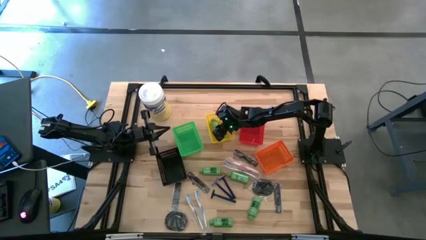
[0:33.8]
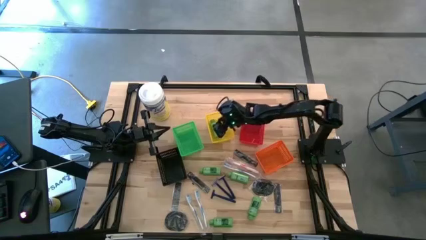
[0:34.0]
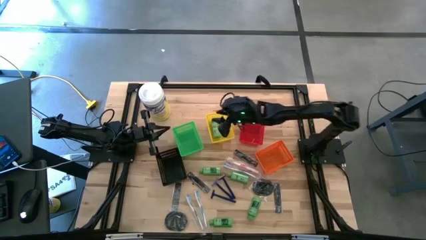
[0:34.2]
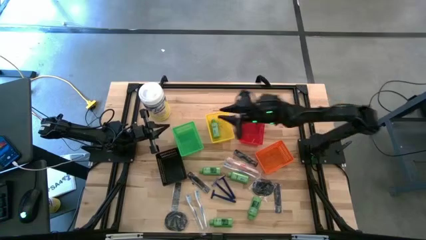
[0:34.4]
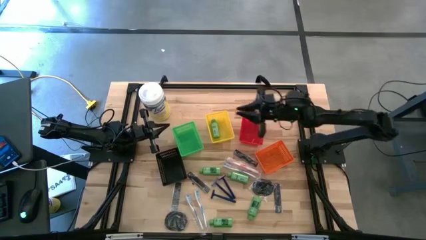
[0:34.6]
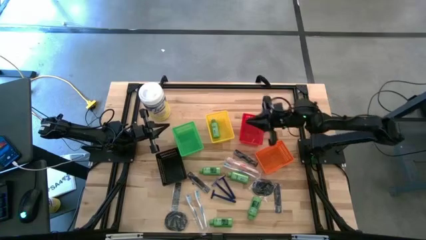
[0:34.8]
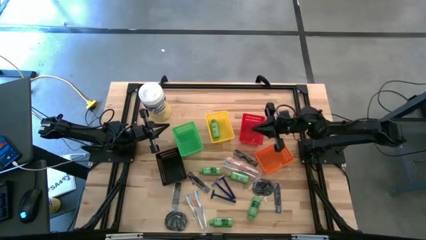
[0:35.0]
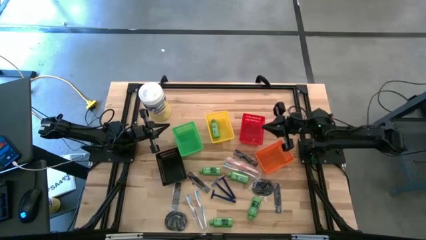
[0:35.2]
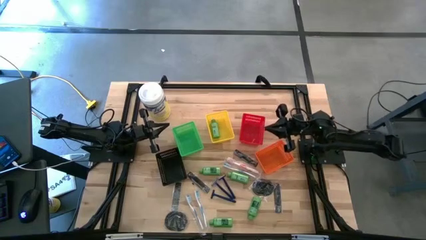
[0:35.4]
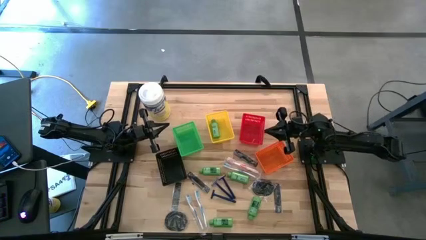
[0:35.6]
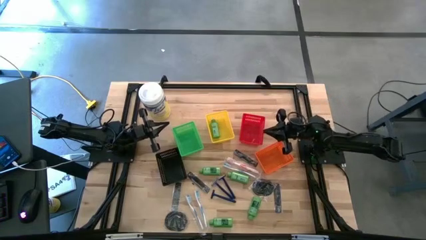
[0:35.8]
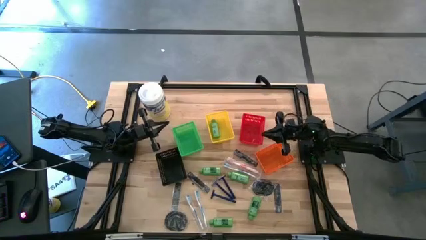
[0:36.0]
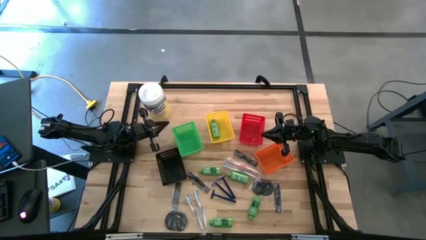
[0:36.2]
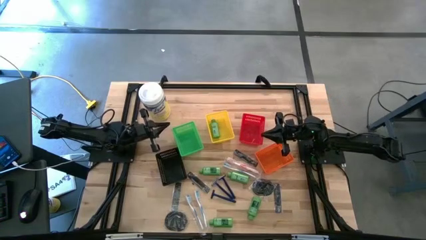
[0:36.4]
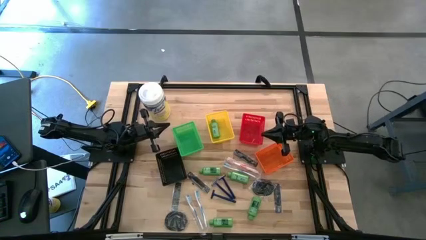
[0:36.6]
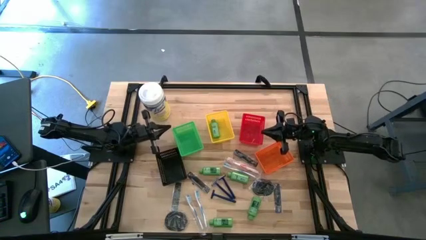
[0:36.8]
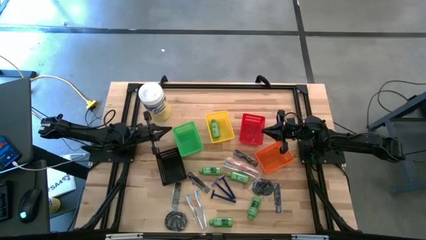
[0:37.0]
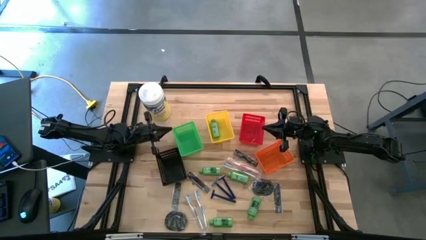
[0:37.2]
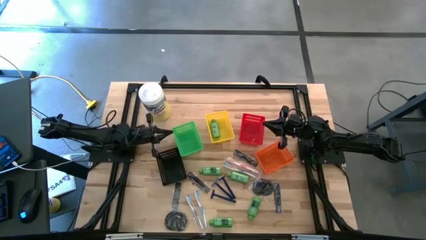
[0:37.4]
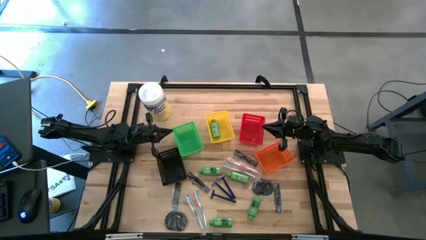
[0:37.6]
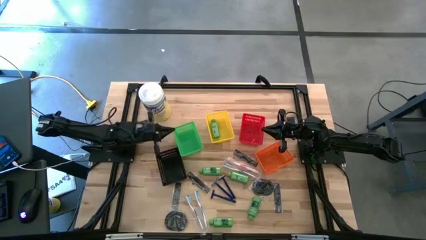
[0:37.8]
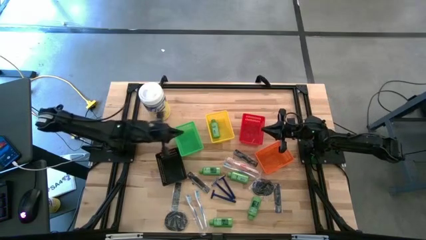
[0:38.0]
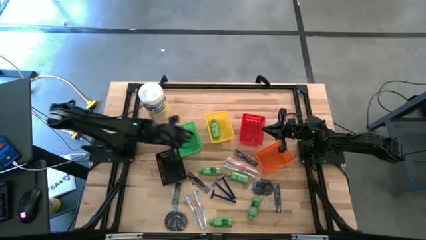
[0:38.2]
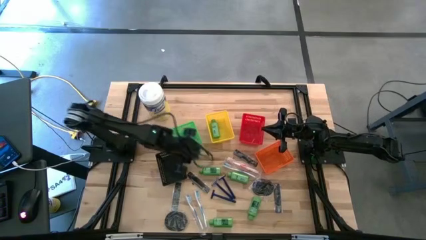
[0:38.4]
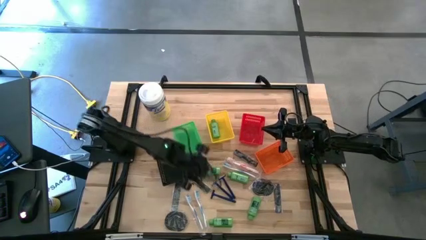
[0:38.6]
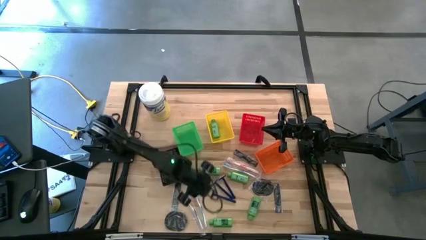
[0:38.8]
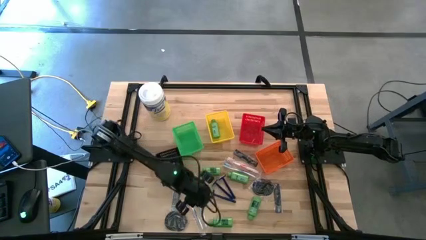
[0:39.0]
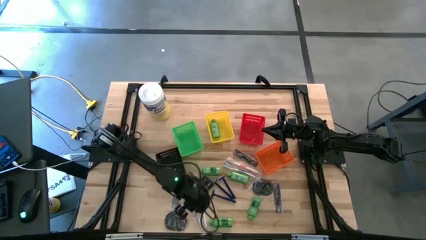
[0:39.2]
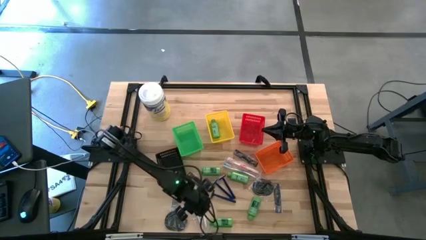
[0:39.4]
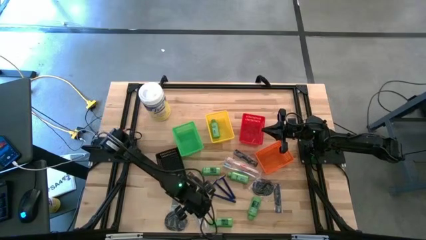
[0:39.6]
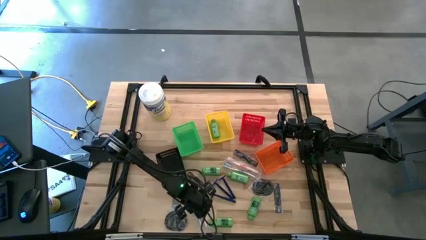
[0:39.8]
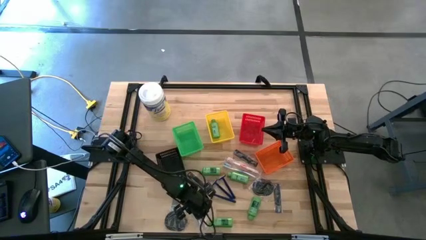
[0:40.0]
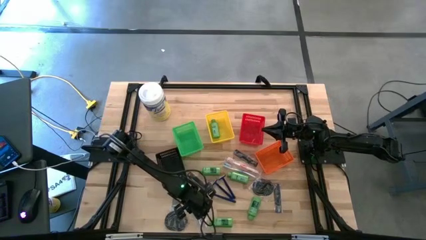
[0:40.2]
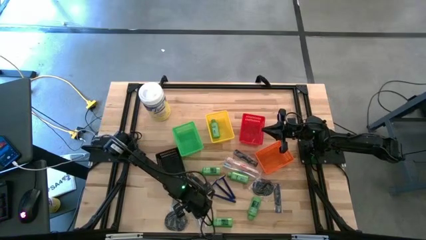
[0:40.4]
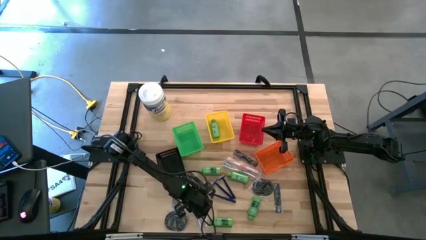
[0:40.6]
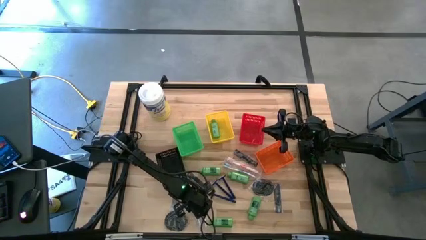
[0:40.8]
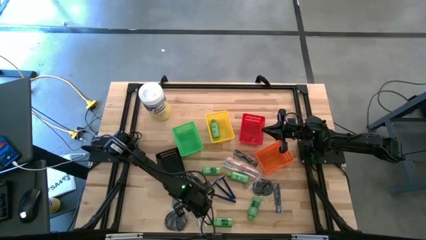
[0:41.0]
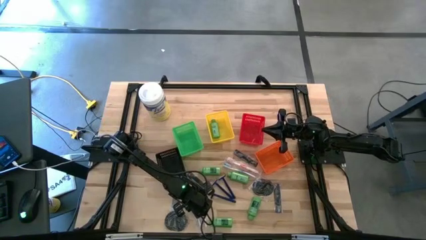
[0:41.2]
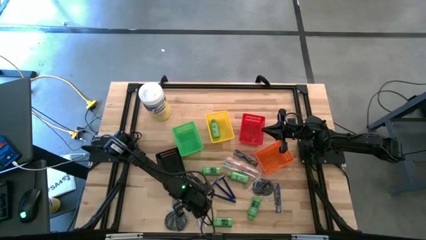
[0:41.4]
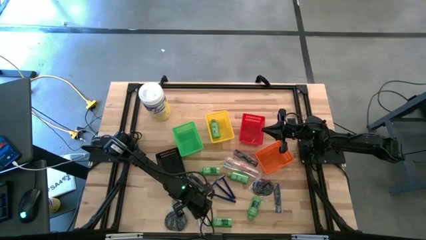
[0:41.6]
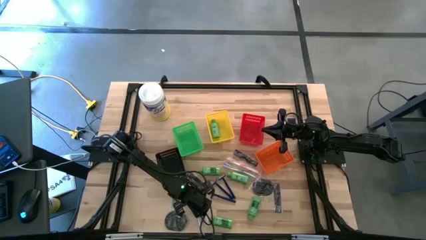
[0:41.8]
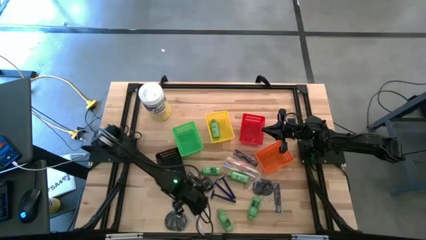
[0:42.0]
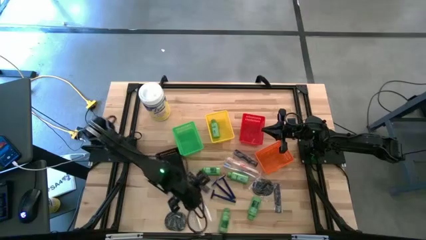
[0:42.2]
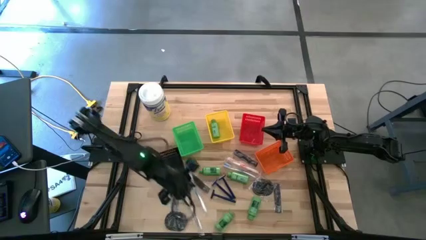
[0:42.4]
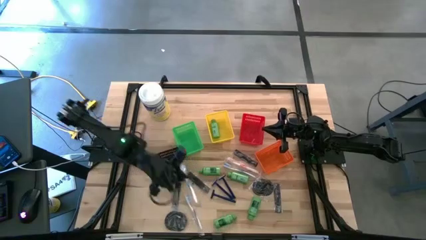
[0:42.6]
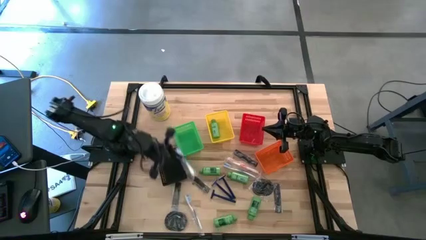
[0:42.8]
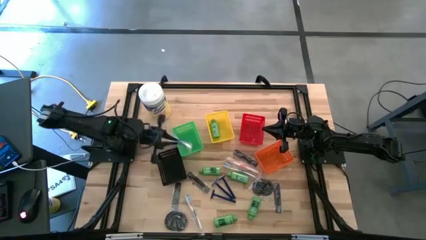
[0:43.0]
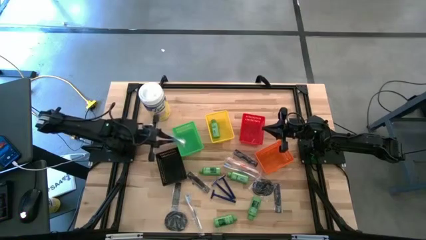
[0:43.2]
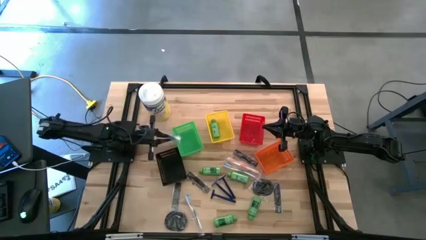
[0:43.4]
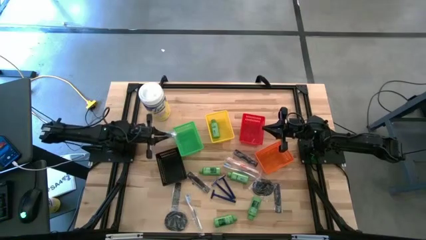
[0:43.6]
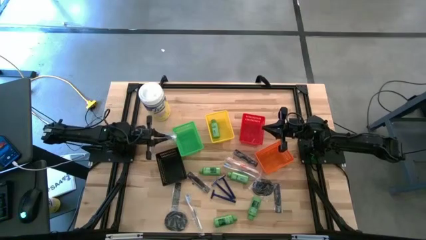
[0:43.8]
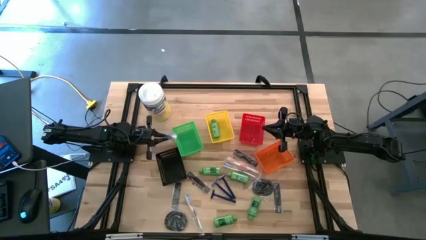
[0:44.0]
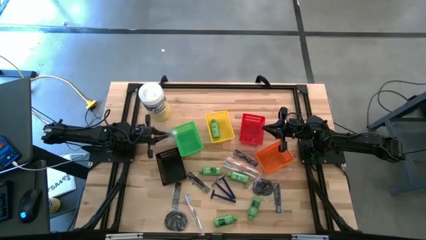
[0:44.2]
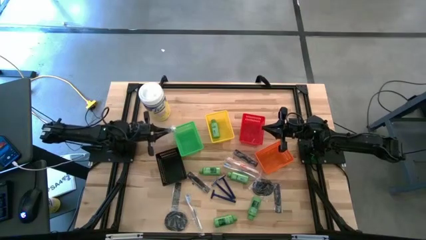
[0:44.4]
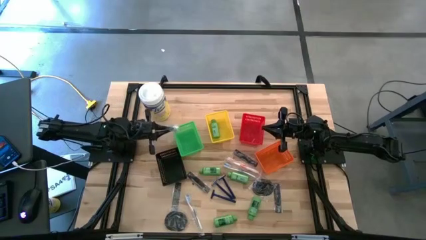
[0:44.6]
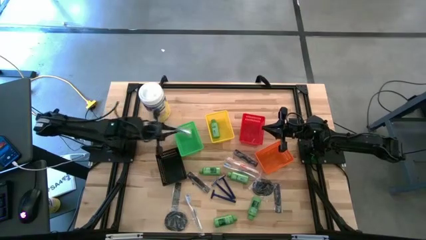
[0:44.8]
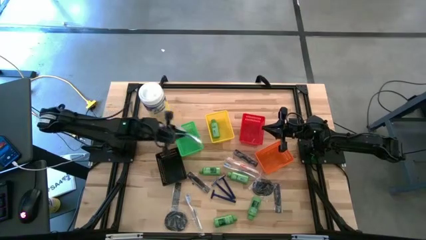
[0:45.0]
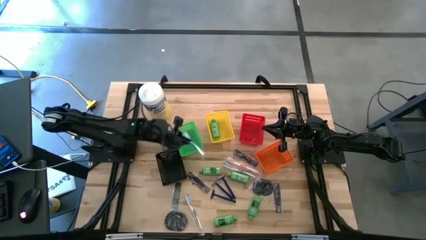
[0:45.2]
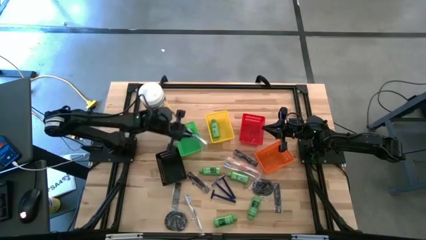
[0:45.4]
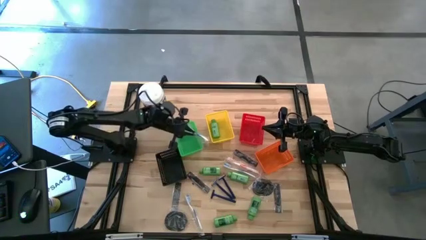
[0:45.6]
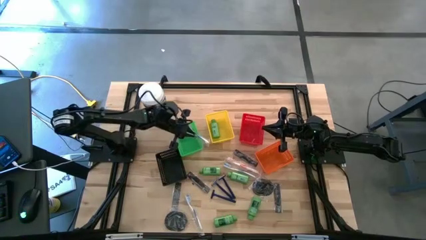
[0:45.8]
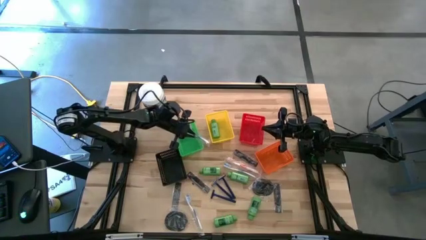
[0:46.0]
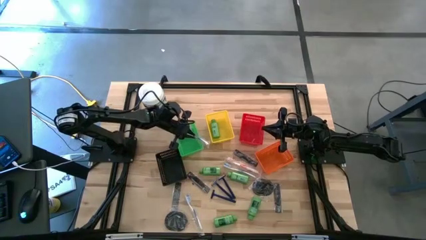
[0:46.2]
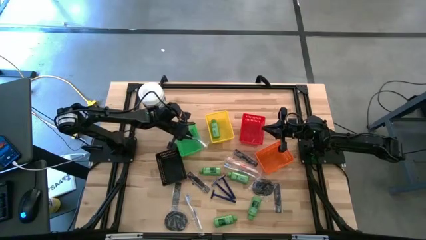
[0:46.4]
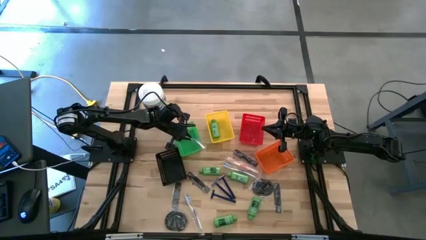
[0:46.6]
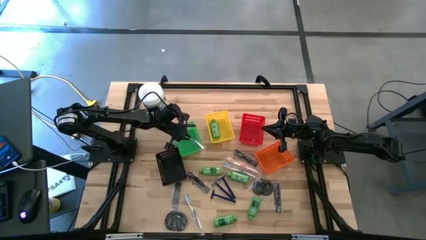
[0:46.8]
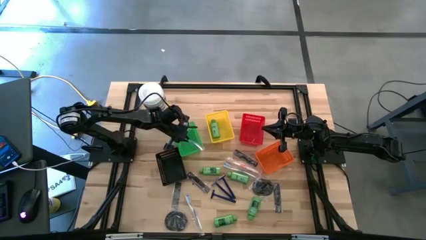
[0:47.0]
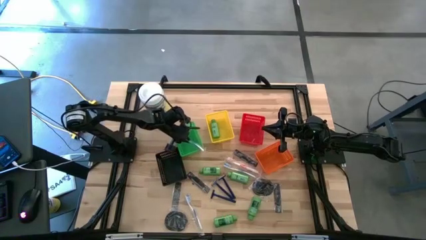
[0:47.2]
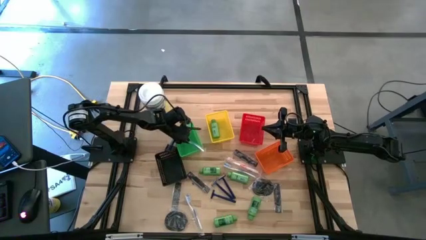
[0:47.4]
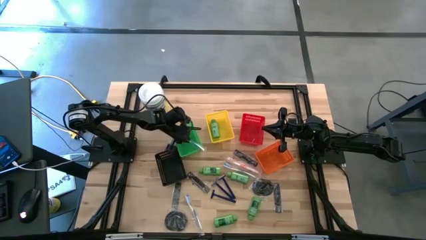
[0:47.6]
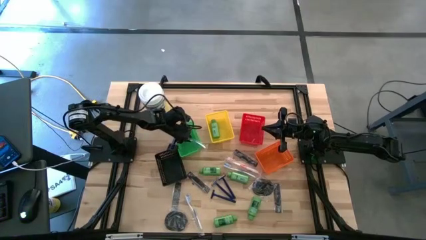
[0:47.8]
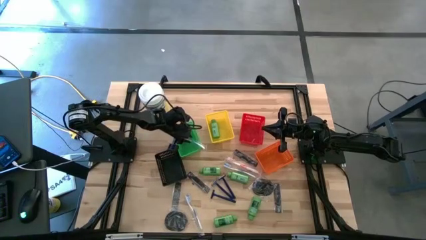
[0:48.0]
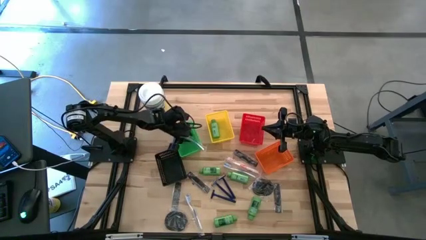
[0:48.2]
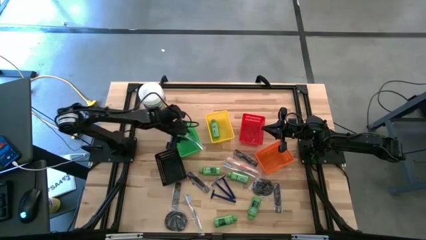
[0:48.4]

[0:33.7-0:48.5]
Task: Pick & Place Travel size toiletries
Put the blue toothbrush into the green bin
